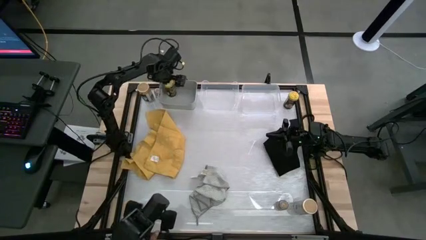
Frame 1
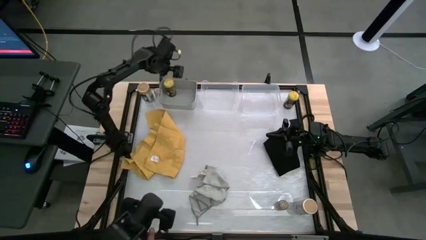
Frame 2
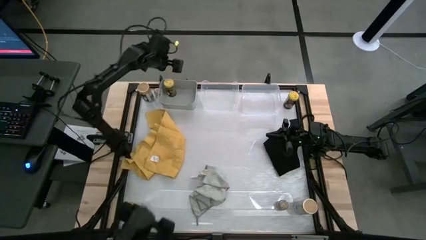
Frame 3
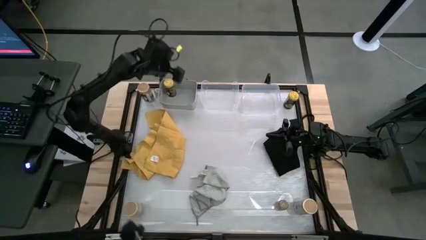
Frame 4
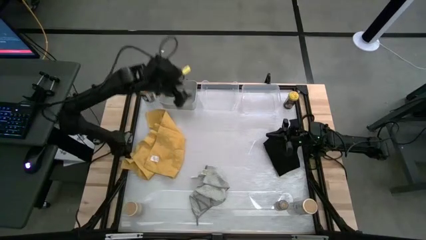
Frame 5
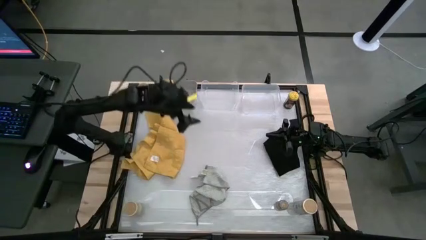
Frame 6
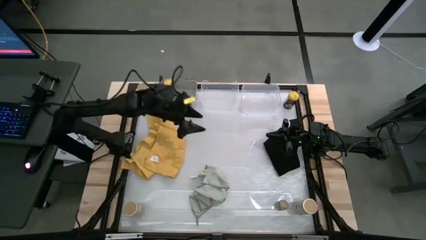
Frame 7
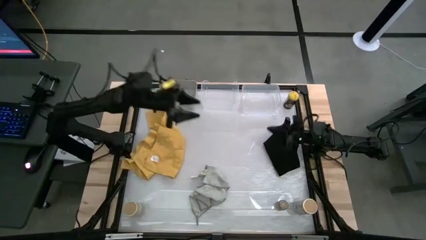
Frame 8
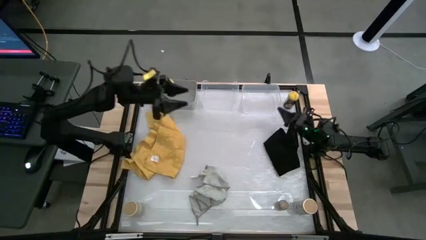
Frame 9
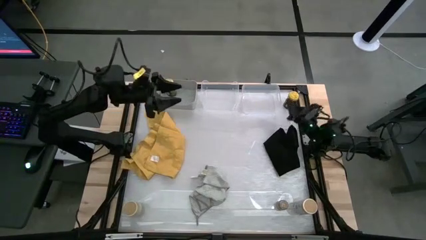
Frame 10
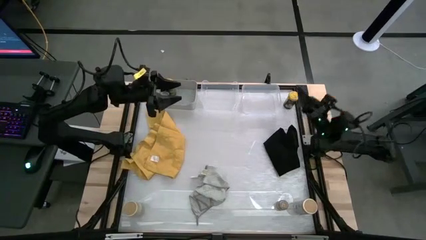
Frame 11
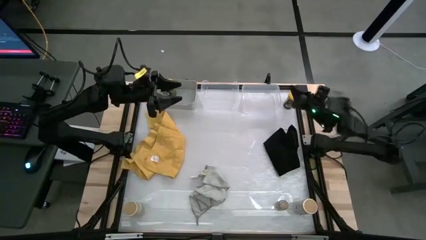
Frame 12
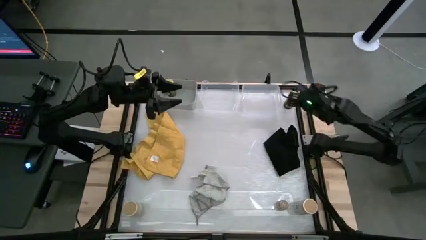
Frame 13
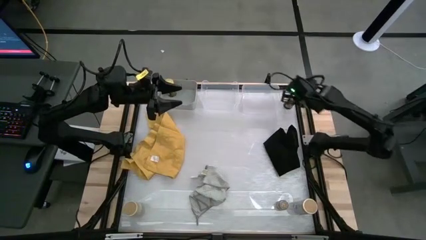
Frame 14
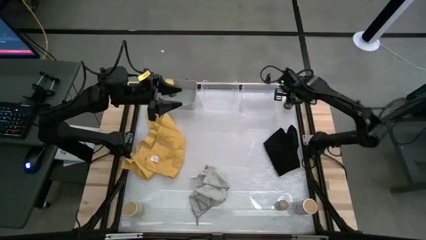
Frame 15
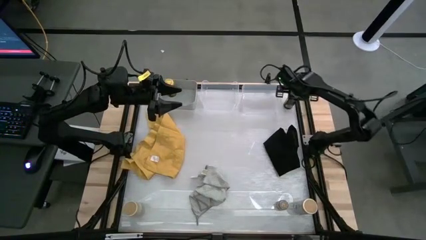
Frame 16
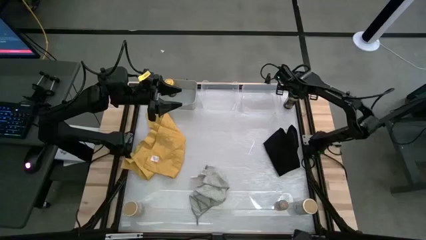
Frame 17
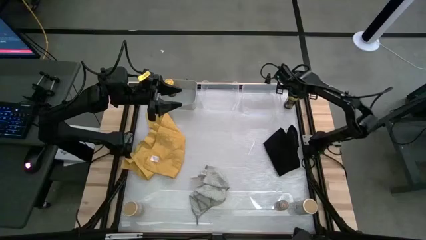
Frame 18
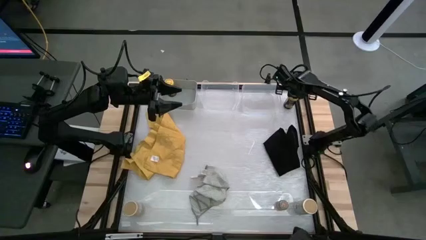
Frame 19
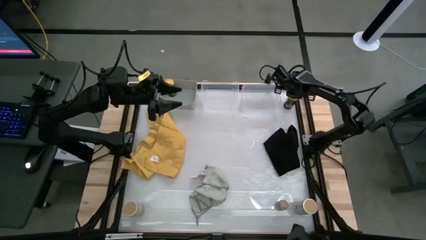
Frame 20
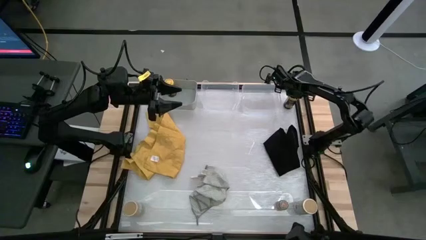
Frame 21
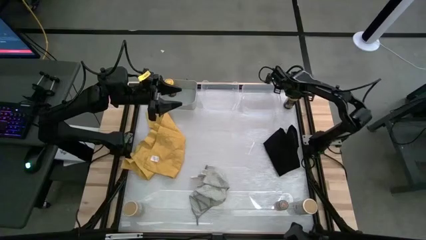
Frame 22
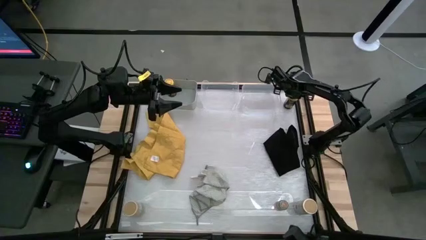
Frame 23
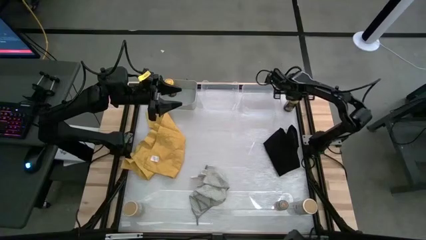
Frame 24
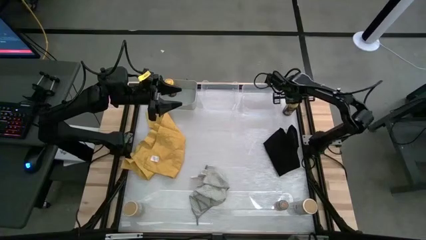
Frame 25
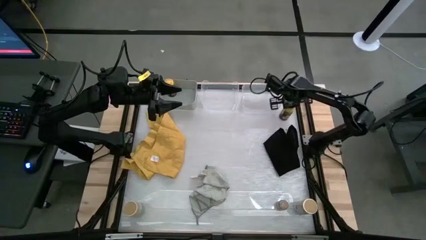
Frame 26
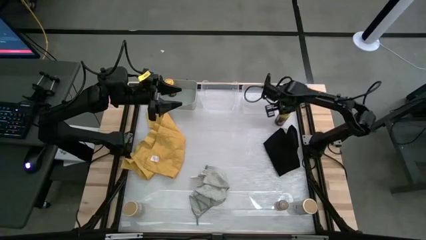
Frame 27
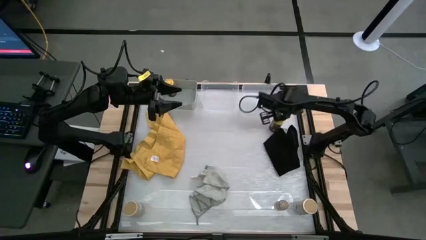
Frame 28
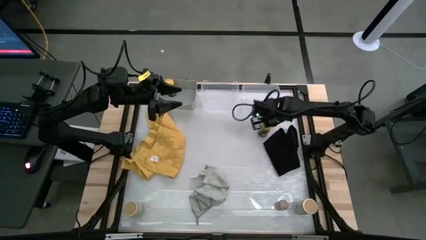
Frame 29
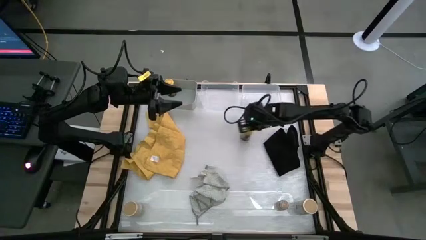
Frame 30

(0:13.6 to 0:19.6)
Task: Sort spices by type
Put the yellow seasoning bottle into the gray bin

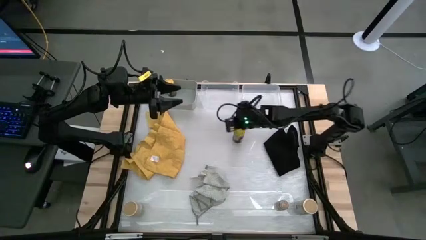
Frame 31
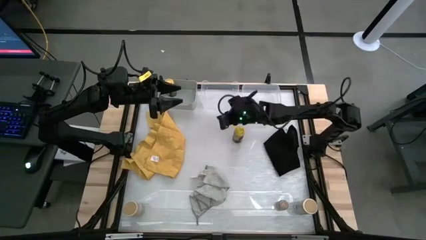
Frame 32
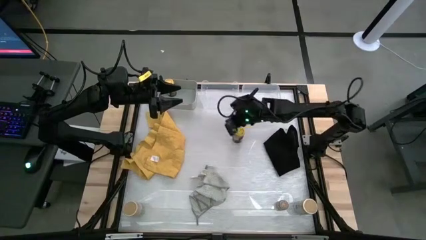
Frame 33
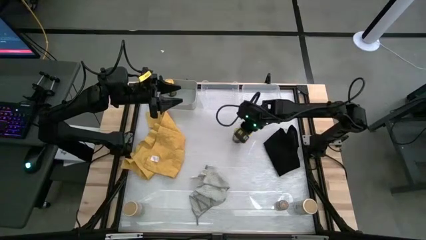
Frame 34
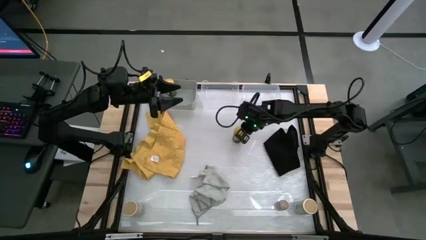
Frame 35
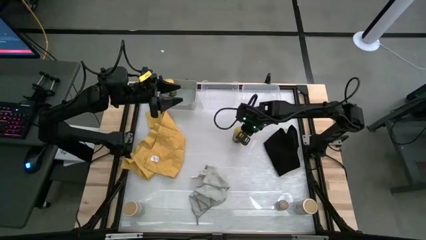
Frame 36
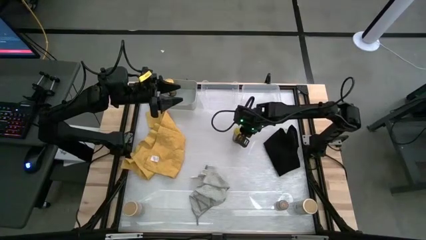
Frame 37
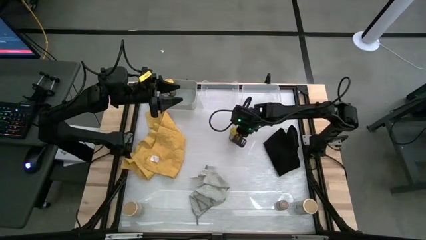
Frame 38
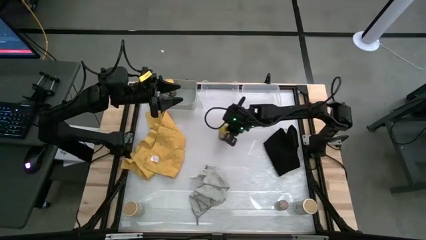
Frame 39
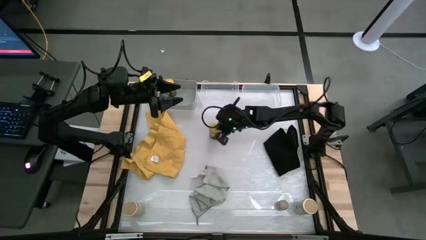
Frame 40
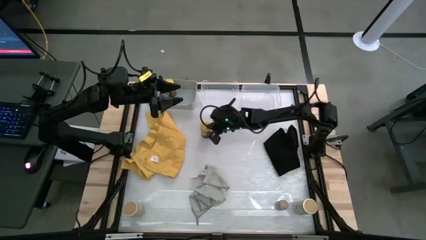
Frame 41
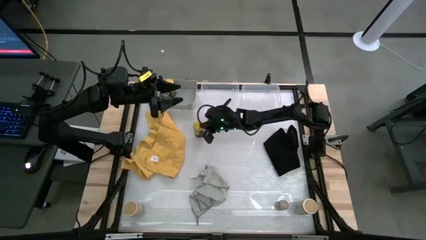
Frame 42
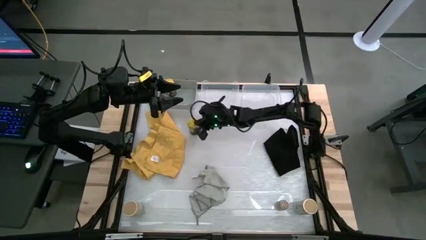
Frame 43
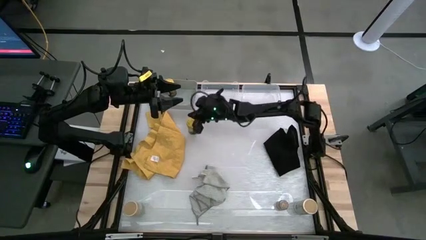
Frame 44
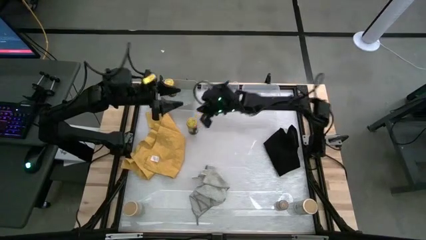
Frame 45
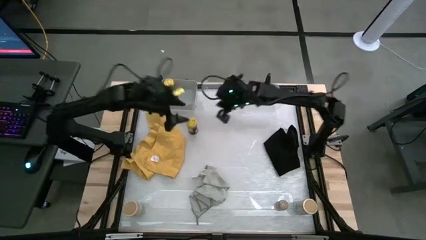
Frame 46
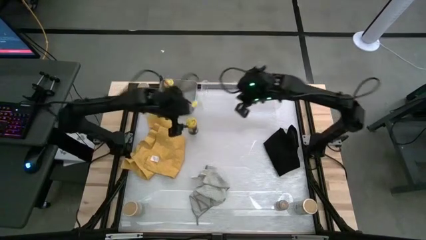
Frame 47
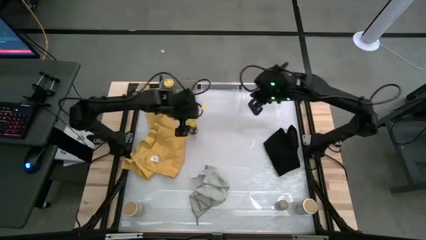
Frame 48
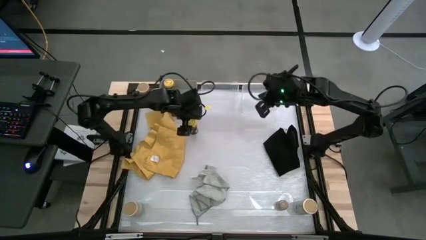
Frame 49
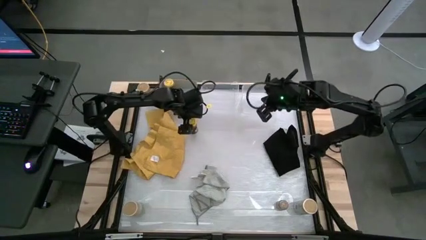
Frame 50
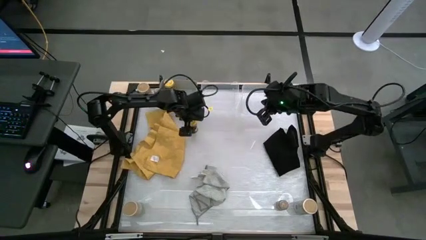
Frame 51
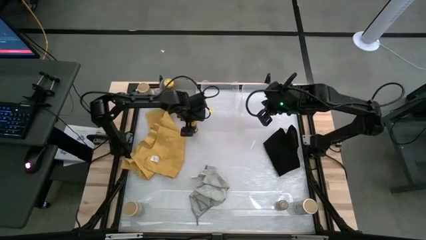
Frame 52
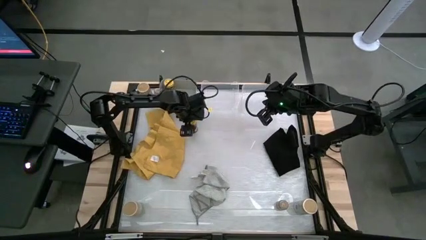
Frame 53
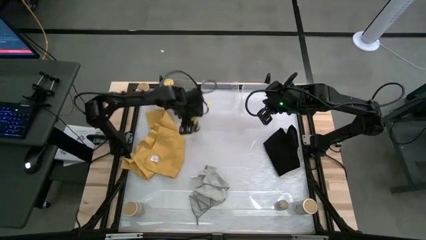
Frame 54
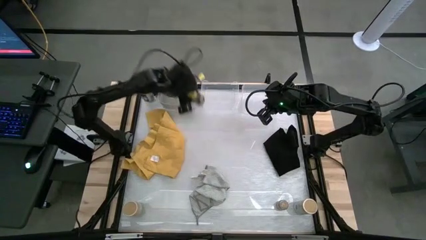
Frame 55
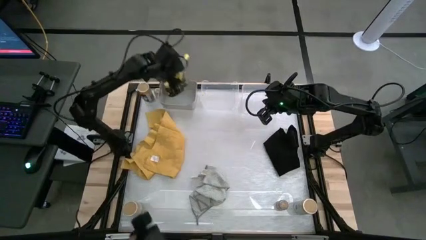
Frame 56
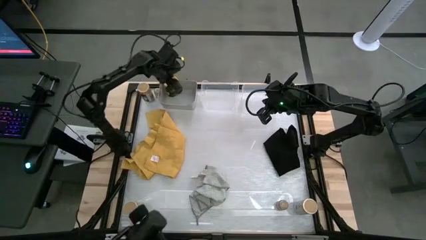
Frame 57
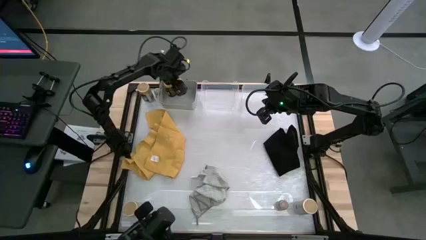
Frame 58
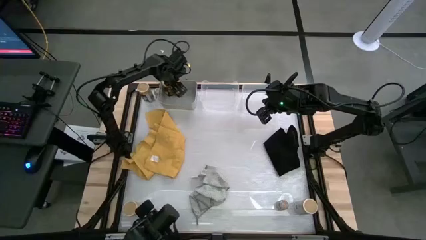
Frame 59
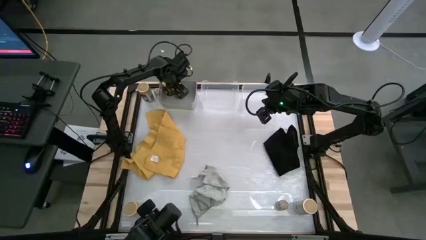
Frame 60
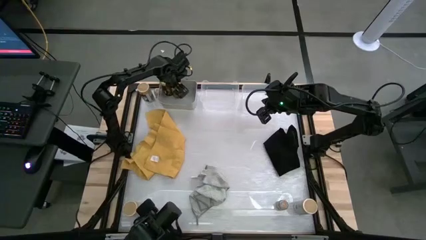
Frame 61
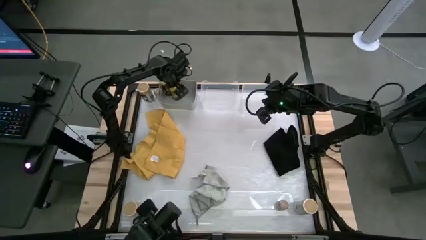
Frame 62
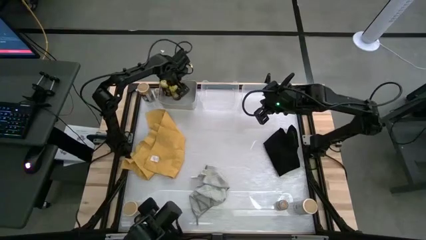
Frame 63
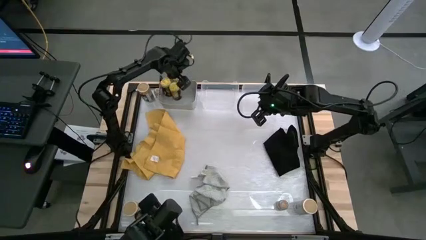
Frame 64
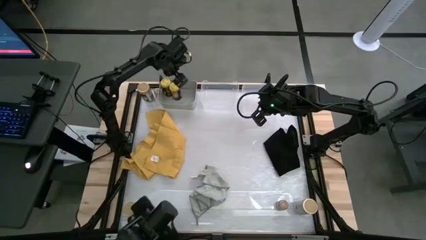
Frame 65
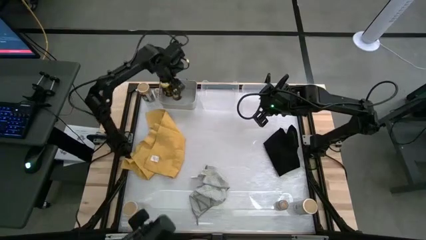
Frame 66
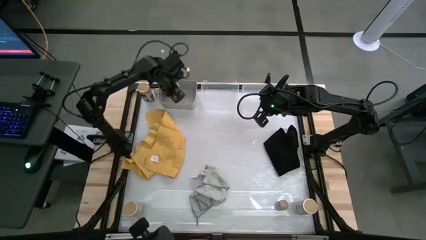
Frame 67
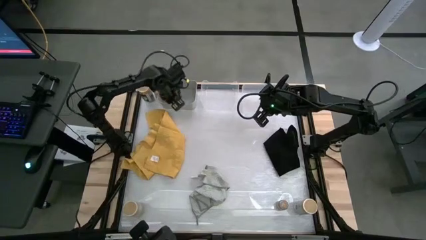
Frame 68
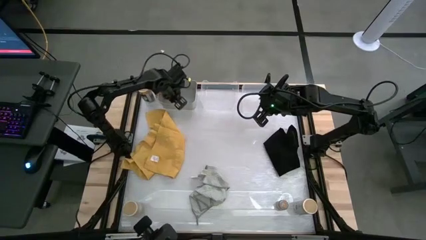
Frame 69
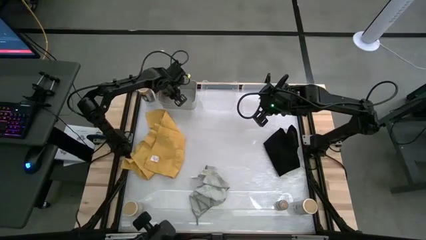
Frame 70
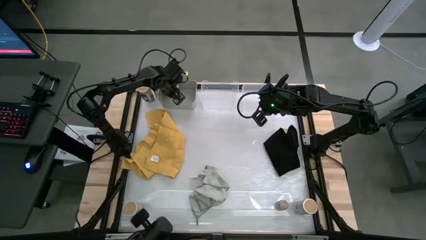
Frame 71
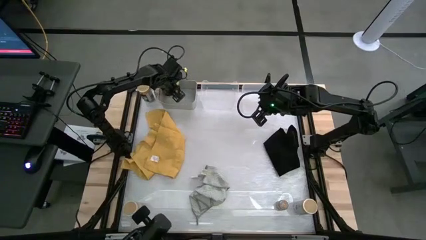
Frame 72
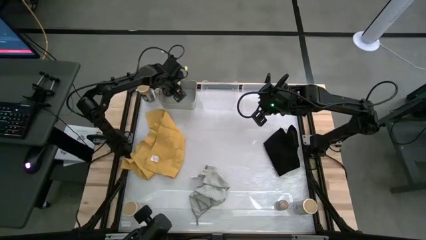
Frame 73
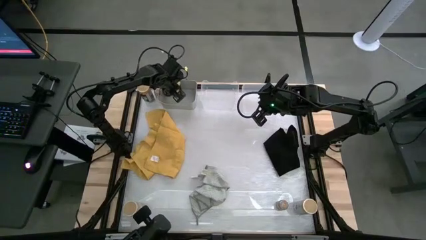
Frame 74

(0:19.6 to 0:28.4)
Put the yellow seasoning bottle into the gray bin
